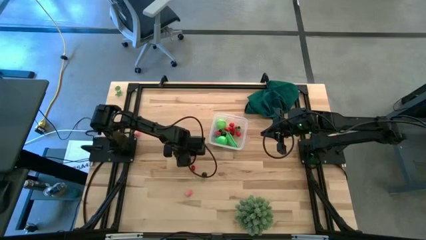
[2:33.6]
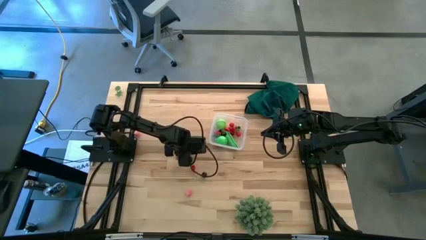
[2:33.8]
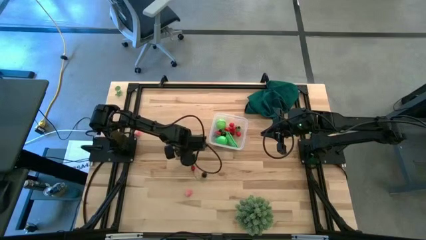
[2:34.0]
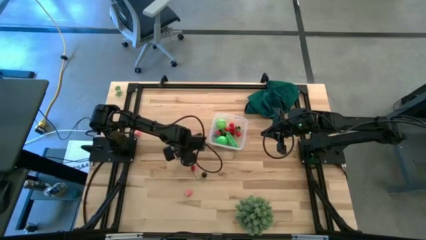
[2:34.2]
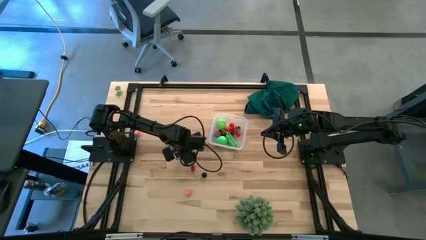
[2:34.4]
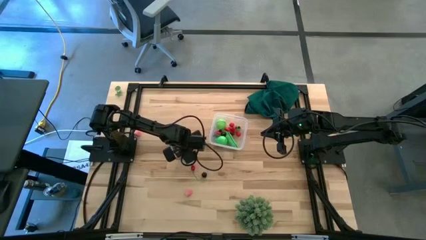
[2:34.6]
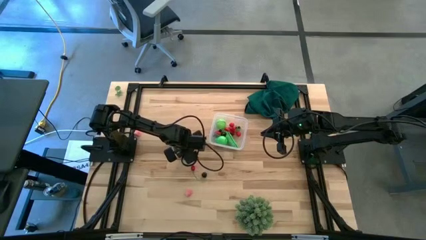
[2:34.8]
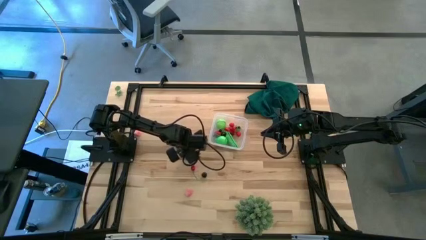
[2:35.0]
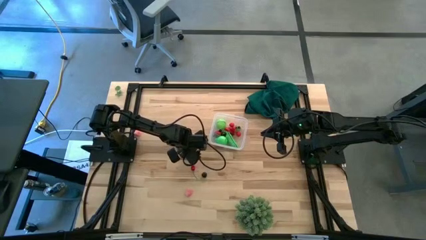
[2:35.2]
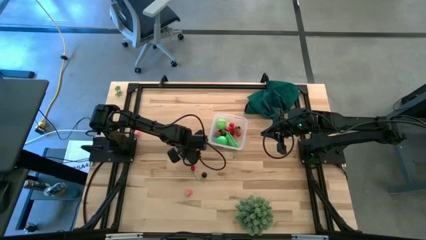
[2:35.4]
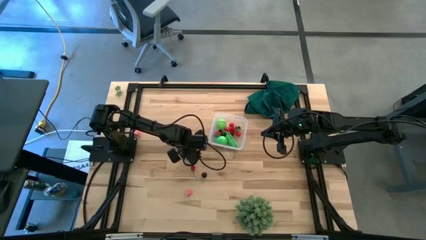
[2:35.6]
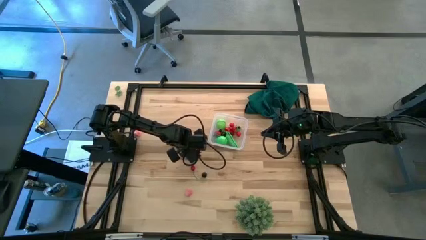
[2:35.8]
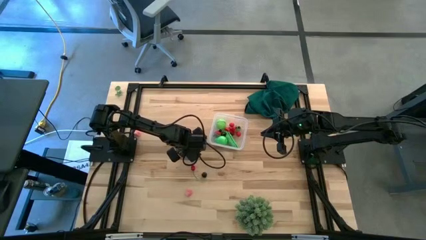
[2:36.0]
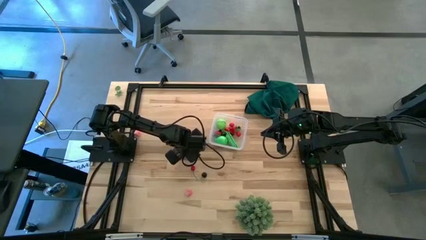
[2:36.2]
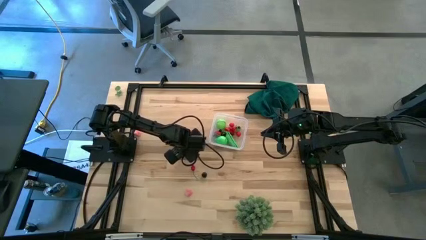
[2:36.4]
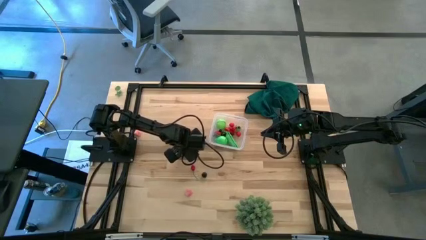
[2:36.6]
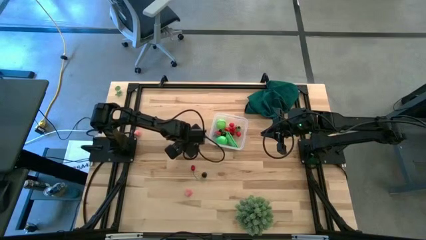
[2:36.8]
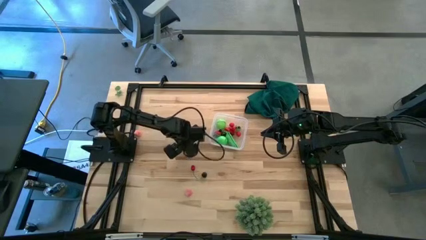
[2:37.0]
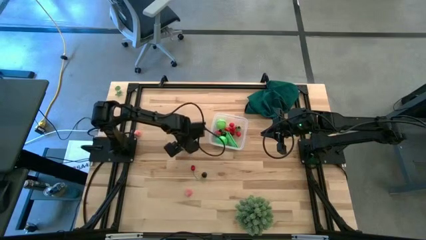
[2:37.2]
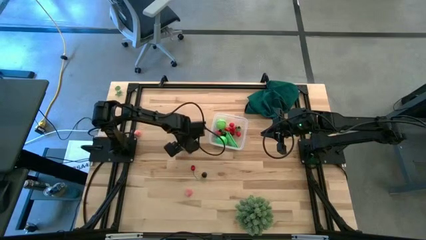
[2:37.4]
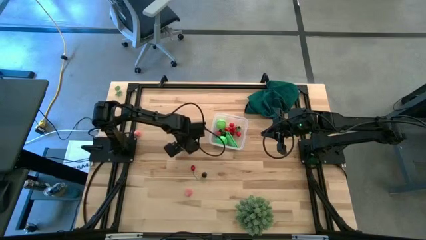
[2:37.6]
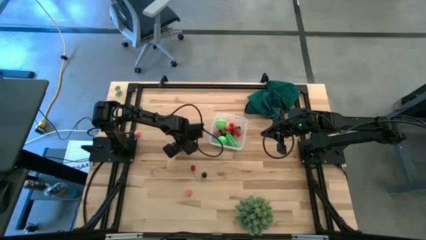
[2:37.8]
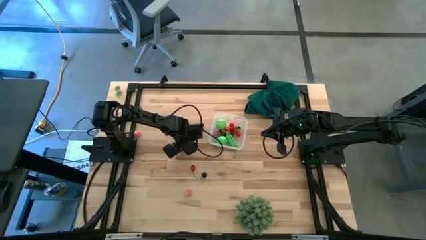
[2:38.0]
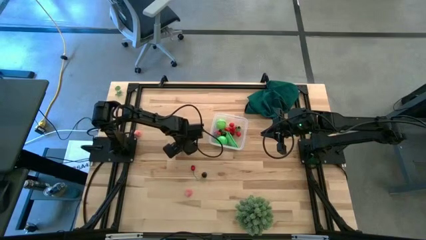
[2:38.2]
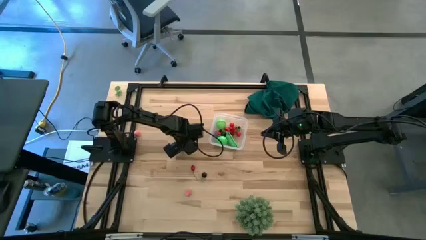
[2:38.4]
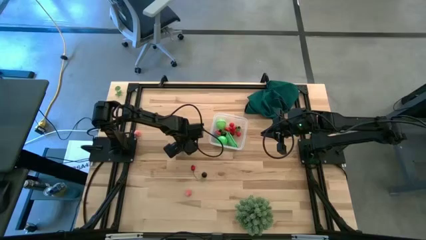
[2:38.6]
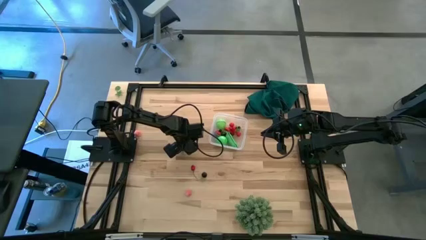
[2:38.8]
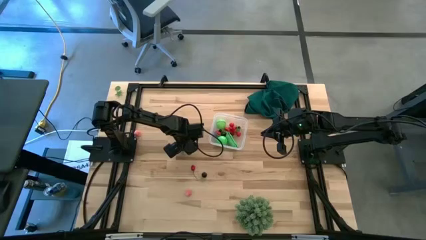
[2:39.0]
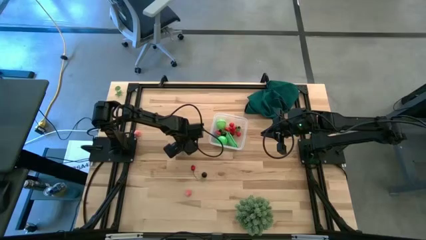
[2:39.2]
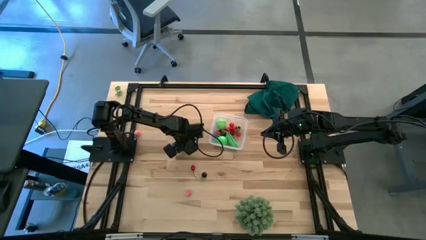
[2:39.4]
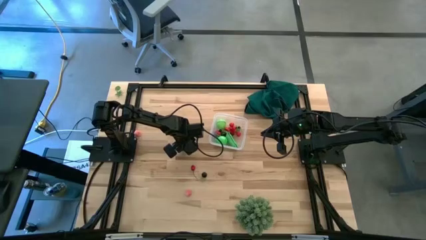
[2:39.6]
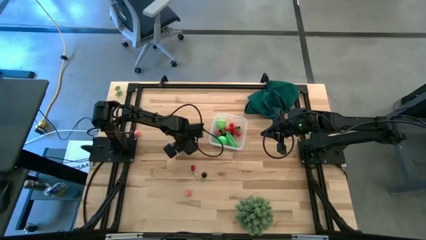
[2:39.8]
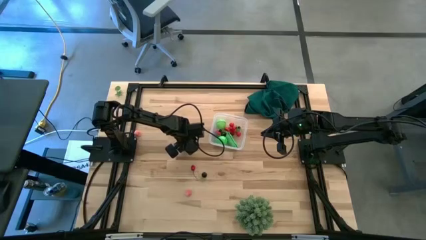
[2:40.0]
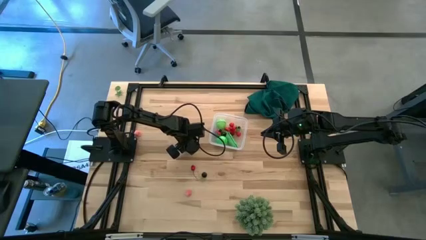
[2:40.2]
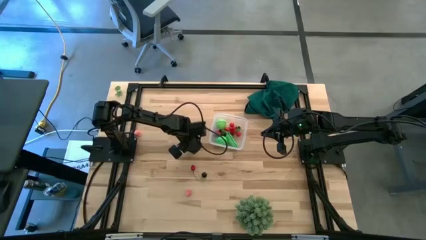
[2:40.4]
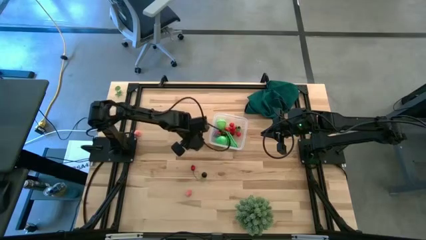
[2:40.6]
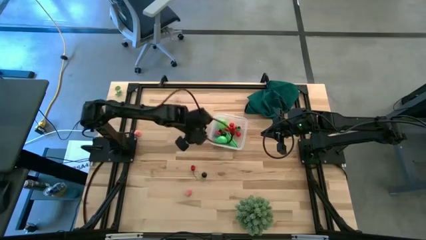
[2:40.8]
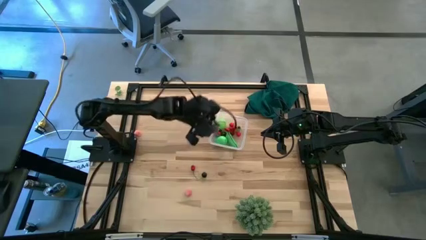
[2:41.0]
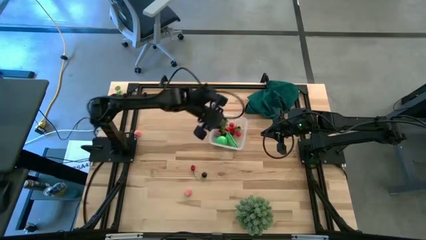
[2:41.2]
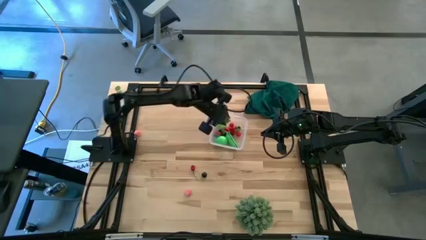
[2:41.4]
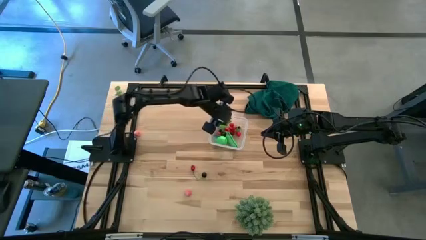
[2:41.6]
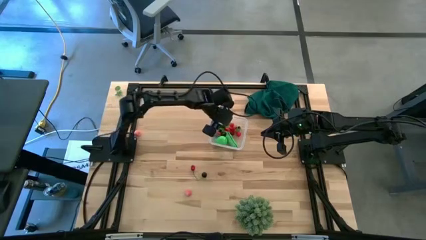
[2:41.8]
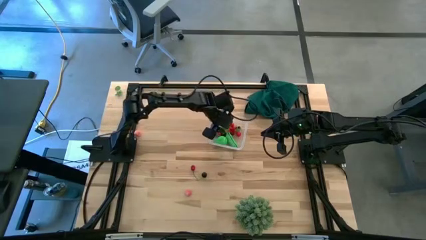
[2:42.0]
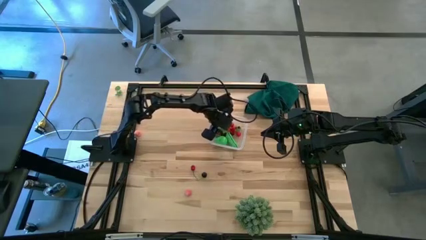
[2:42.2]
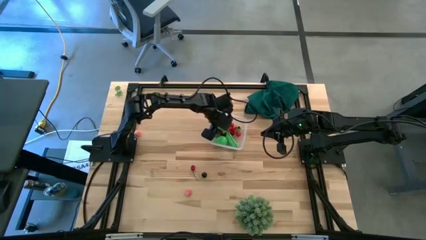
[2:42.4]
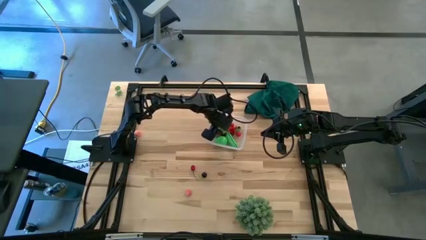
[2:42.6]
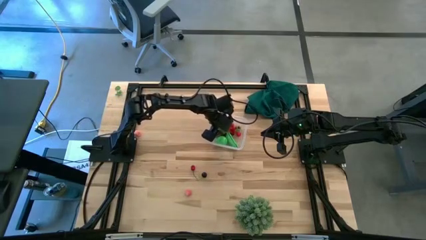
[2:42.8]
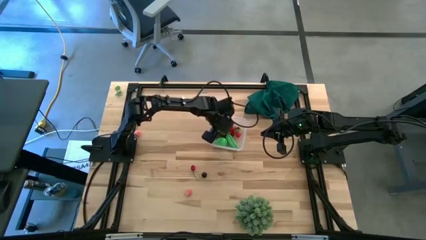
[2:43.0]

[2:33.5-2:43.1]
Task: Pick and placing Produce into tupperware
Put the red strawberry into the transparent bin

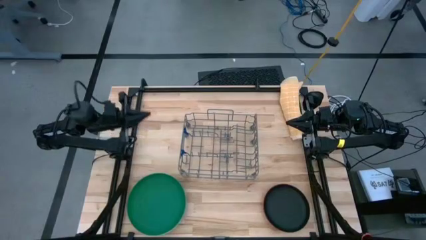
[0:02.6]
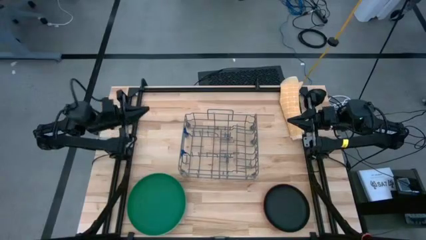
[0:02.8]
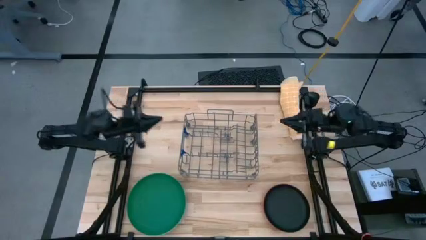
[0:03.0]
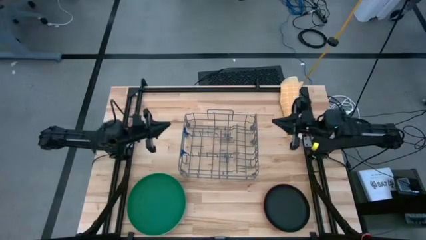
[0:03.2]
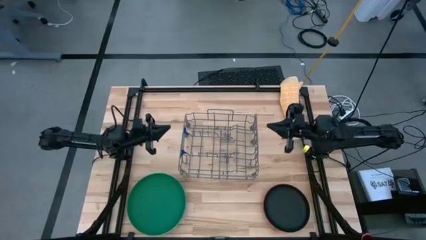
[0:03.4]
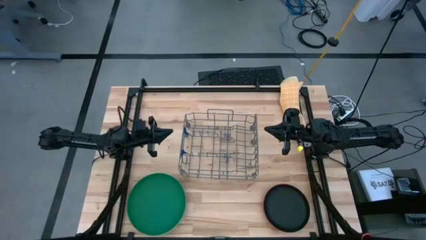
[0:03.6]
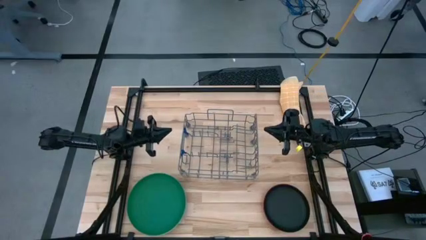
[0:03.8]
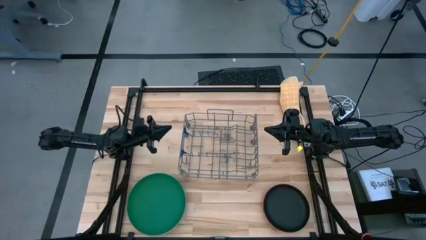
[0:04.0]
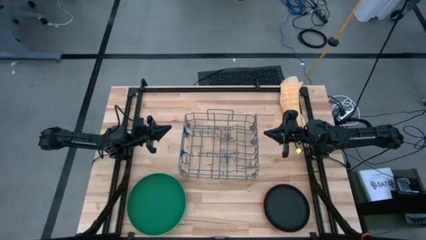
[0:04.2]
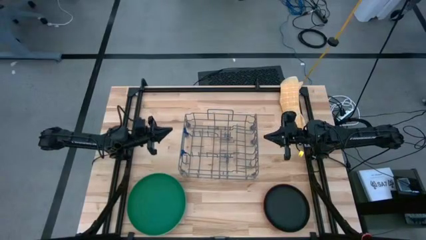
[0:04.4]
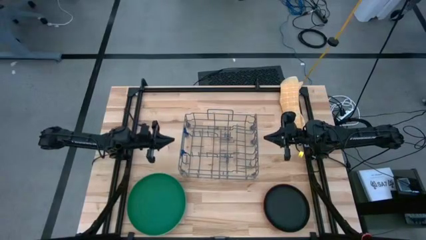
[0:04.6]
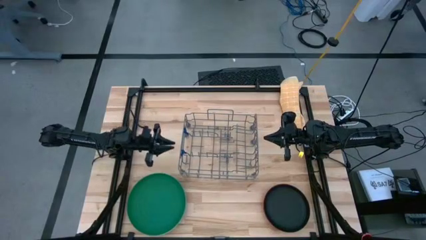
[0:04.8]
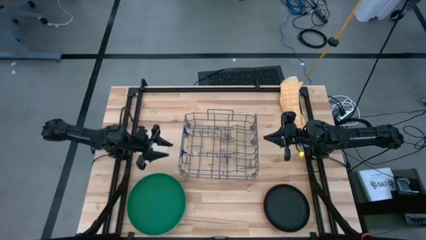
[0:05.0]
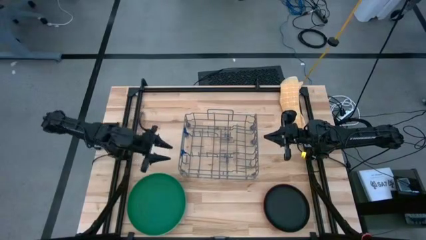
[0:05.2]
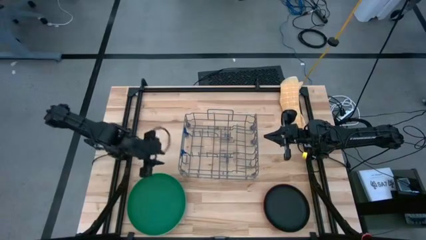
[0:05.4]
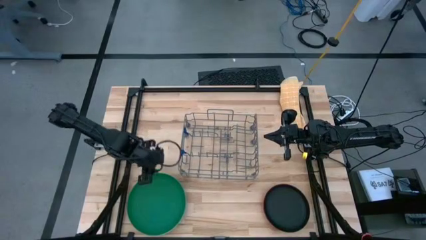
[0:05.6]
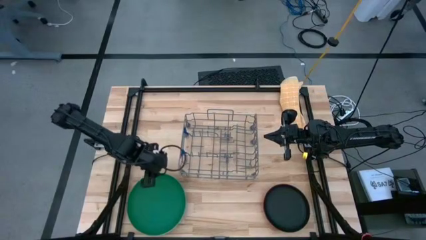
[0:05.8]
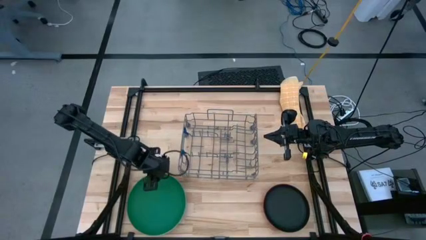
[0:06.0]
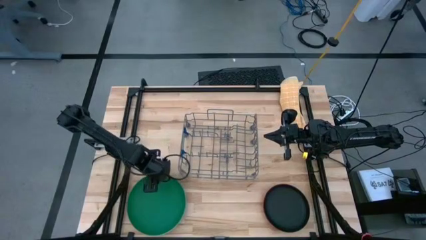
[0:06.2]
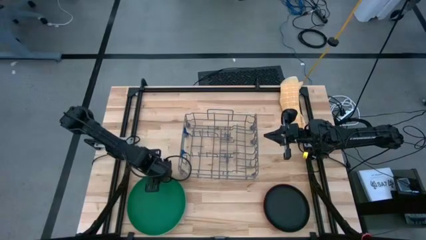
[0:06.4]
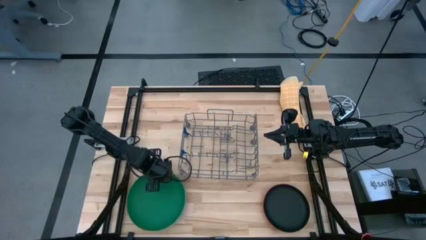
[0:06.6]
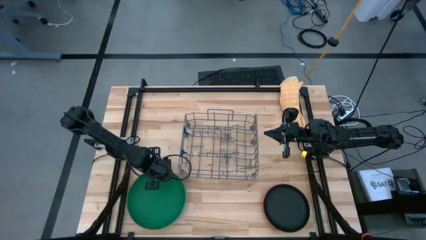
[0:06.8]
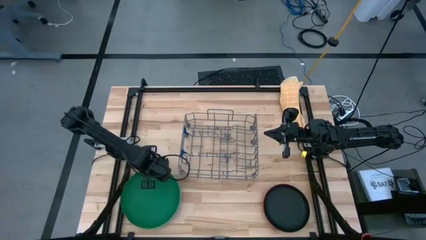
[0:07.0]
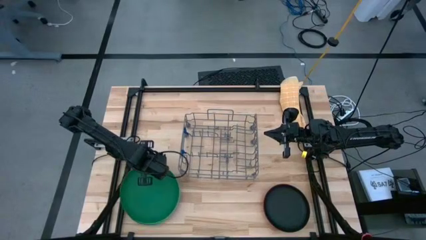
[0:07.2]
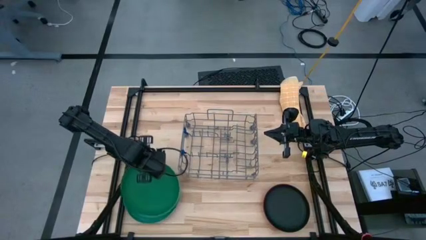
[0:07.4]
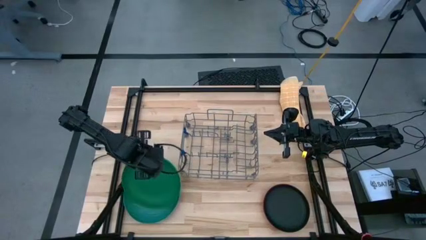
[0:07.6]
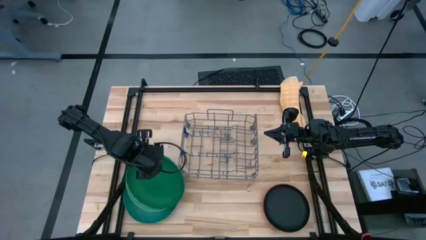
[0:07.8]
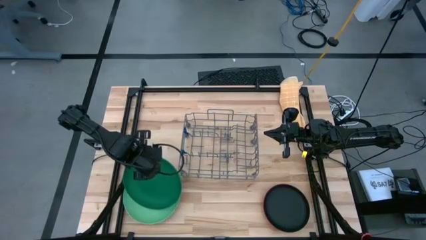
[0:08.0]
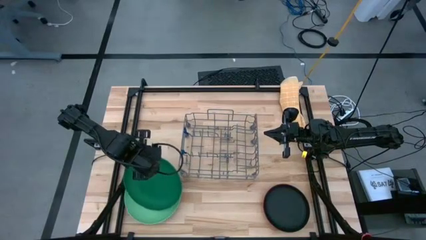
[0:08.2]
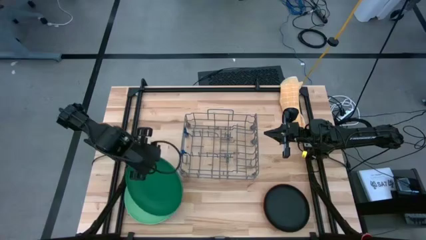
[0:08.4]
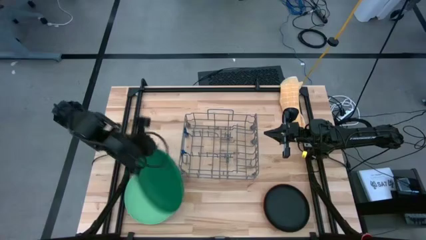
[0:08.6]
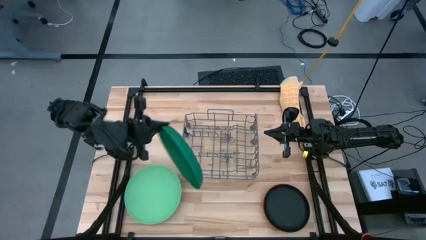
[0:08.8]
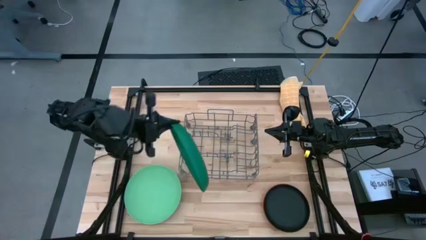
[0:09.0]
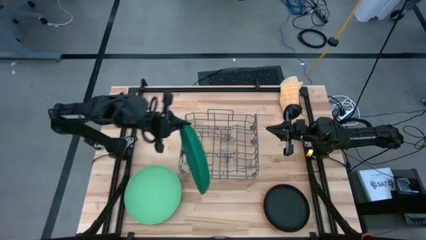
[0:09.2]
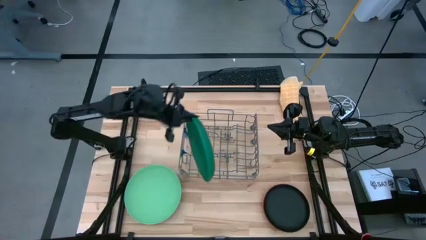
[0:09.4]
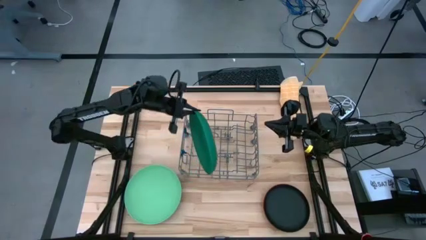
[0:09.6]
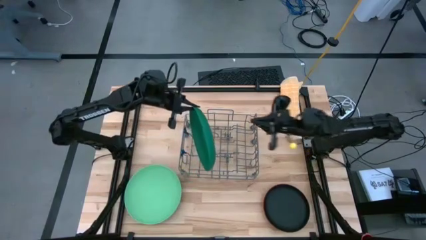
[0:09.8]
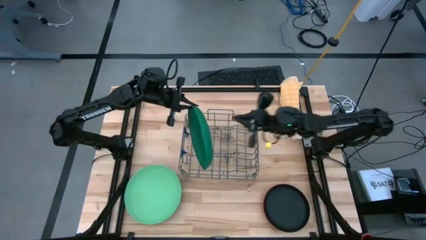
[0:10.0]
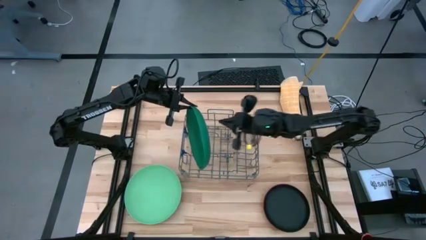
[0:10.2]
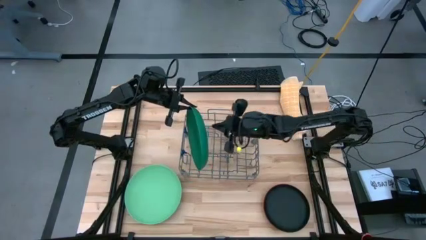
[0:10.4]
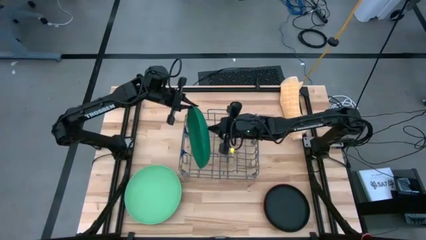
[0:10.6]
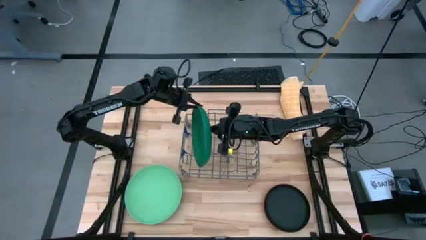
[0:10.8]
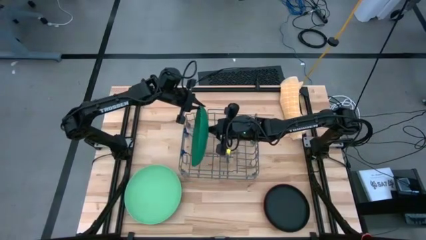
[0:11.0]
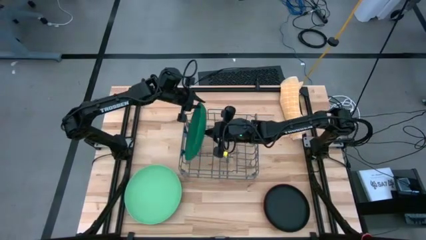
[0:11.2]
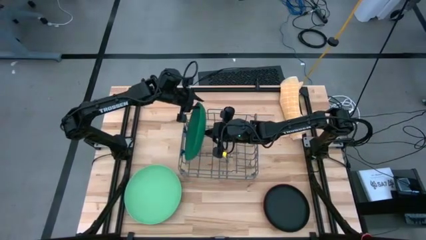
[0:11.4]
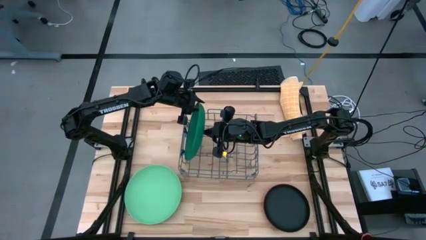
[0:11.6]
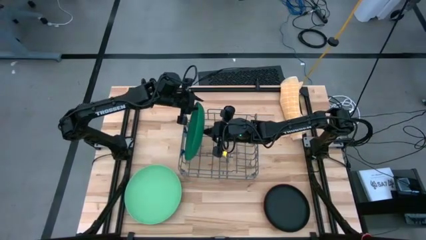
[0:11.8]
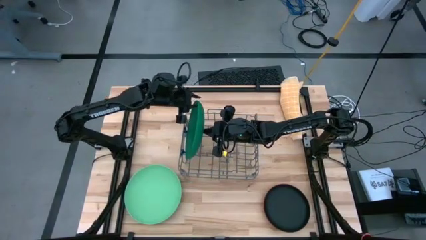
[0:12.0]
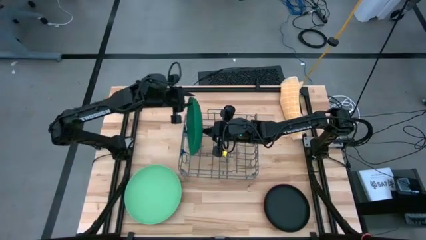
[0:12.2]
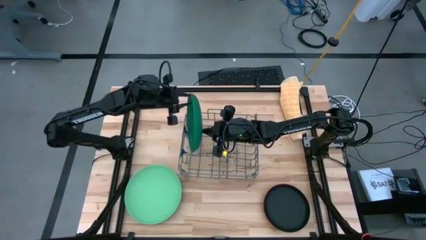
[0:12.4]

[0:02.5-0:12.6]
Task: Sort dishes
Put the green plate into the dish rack
